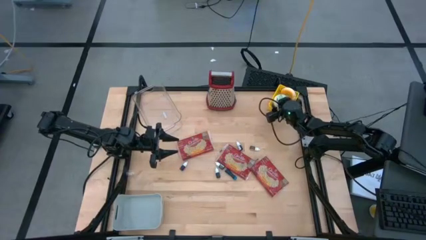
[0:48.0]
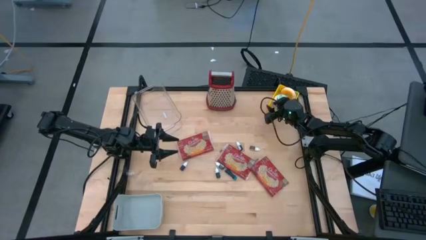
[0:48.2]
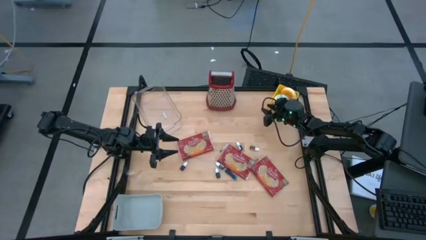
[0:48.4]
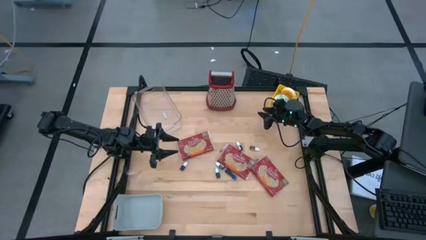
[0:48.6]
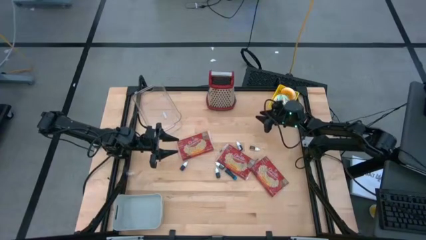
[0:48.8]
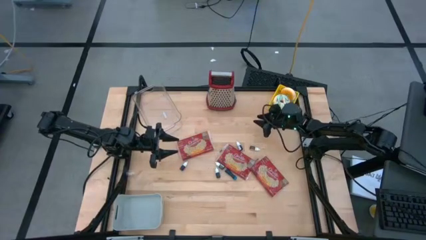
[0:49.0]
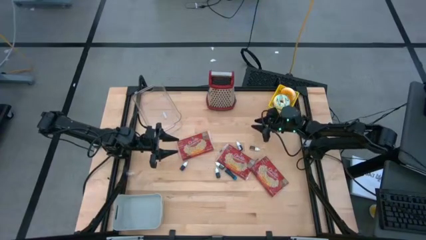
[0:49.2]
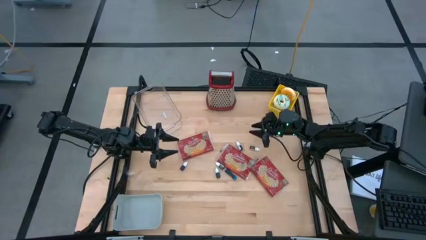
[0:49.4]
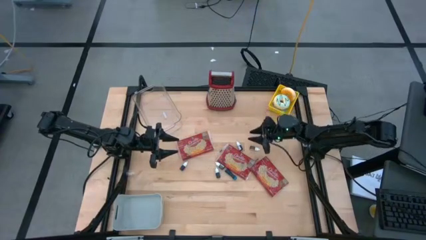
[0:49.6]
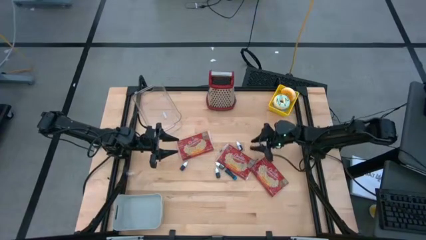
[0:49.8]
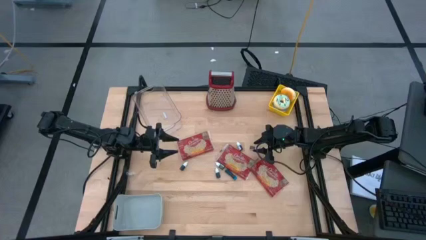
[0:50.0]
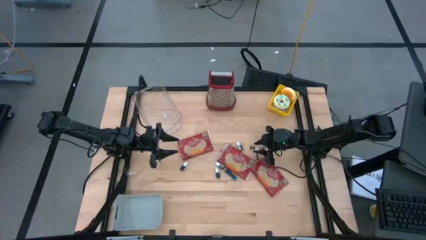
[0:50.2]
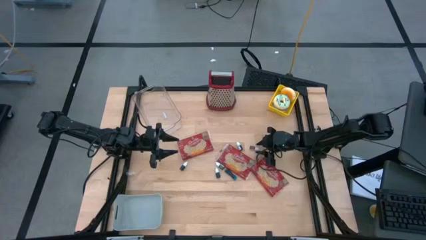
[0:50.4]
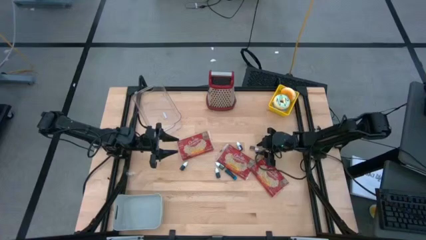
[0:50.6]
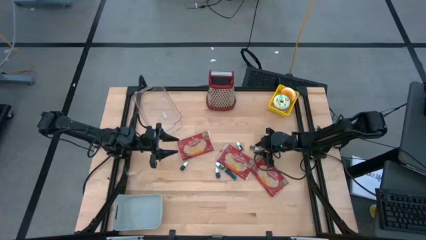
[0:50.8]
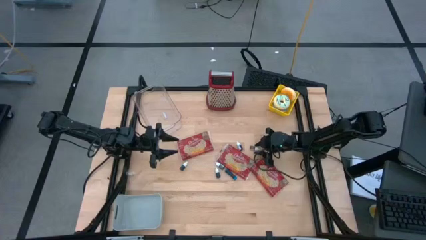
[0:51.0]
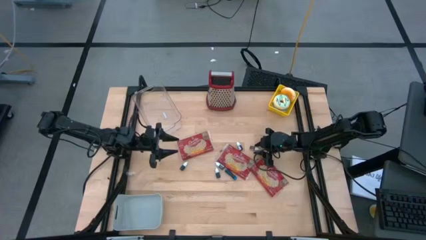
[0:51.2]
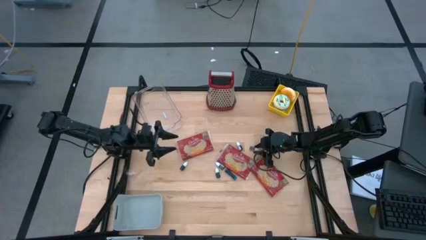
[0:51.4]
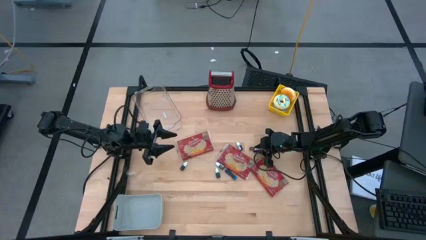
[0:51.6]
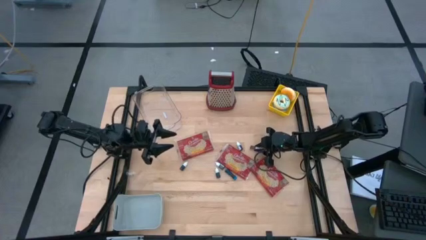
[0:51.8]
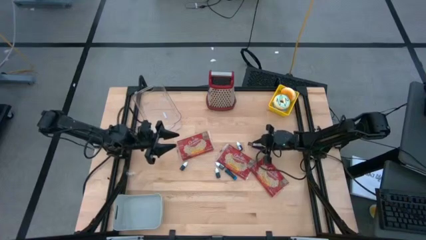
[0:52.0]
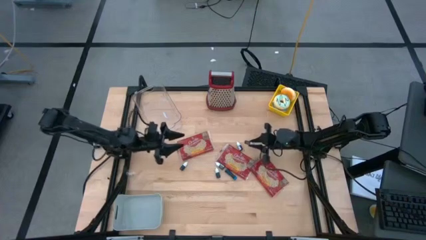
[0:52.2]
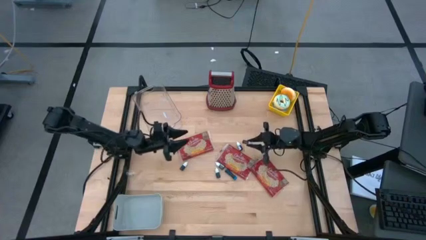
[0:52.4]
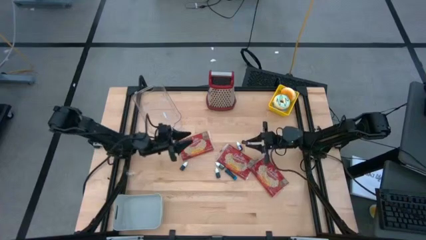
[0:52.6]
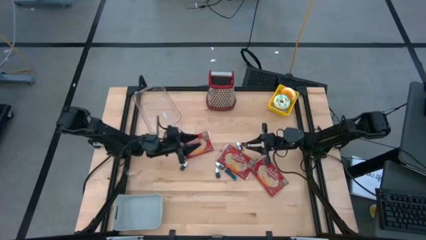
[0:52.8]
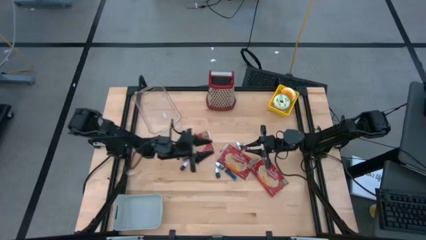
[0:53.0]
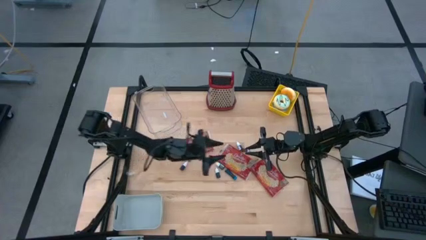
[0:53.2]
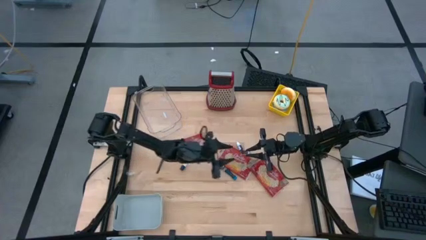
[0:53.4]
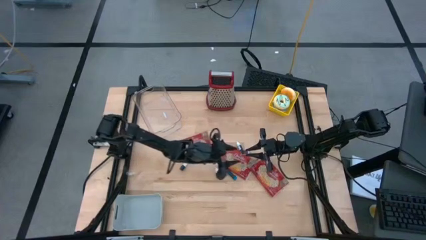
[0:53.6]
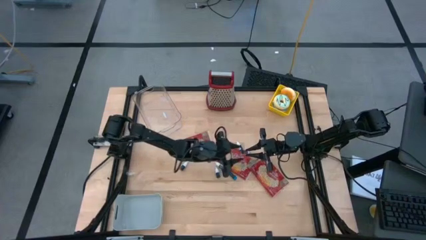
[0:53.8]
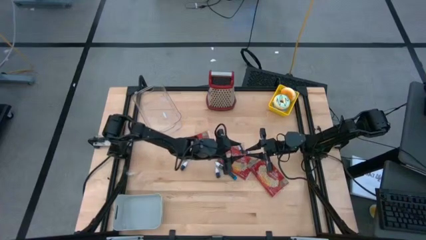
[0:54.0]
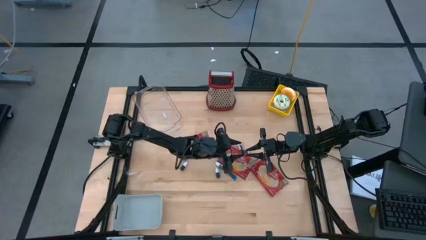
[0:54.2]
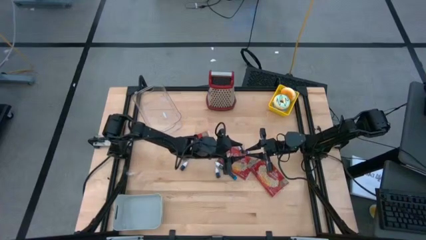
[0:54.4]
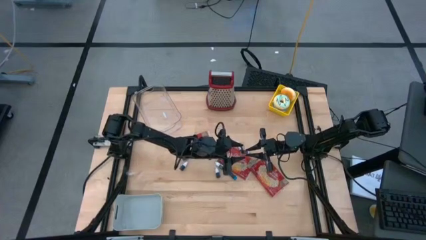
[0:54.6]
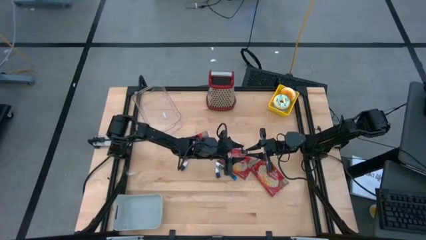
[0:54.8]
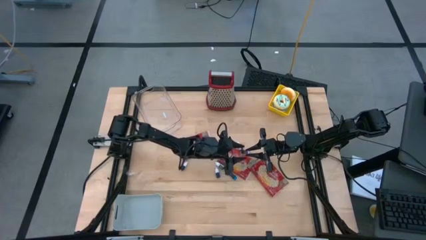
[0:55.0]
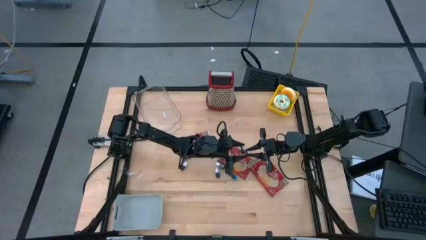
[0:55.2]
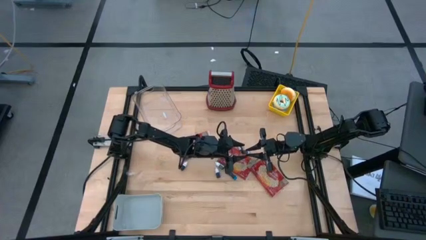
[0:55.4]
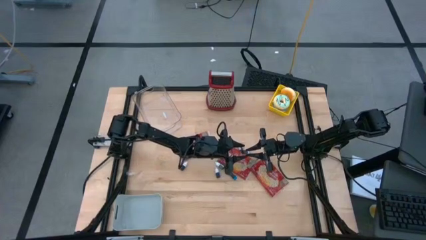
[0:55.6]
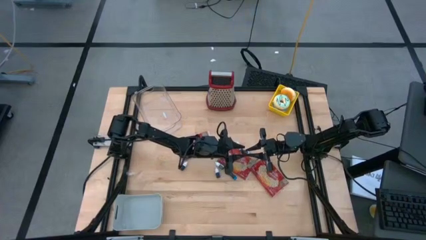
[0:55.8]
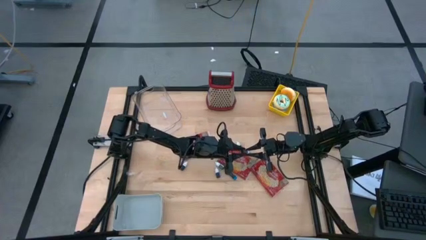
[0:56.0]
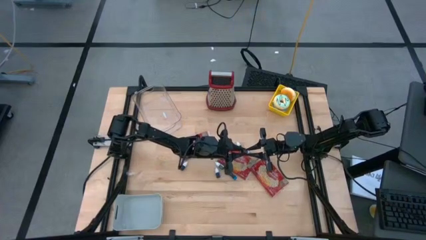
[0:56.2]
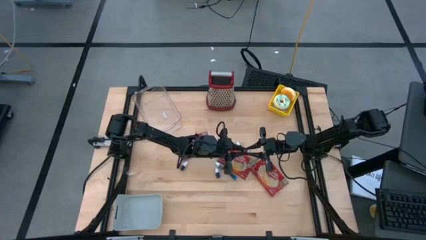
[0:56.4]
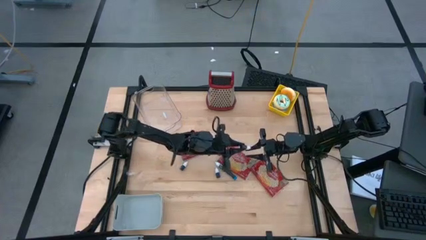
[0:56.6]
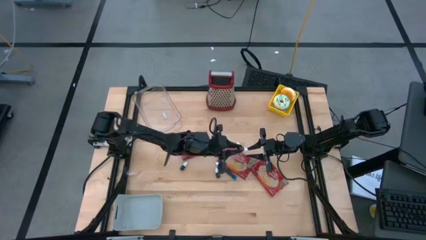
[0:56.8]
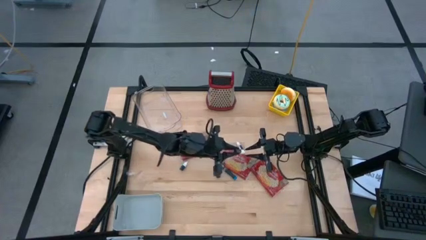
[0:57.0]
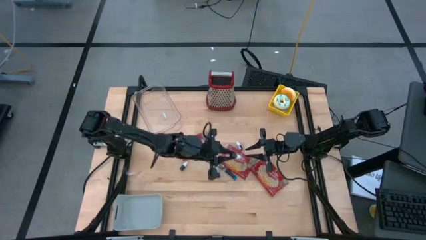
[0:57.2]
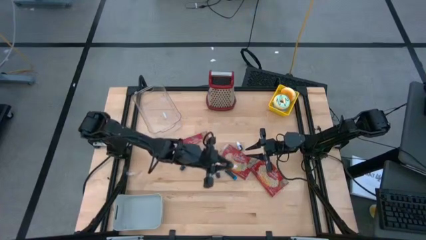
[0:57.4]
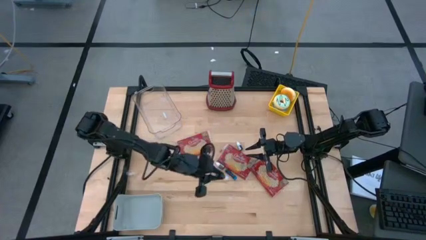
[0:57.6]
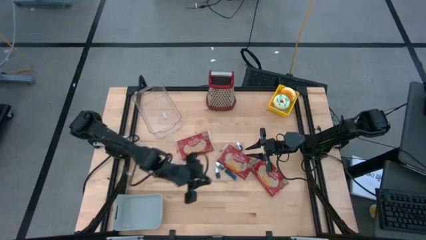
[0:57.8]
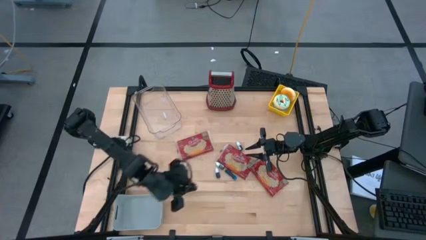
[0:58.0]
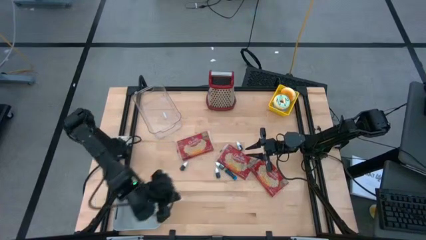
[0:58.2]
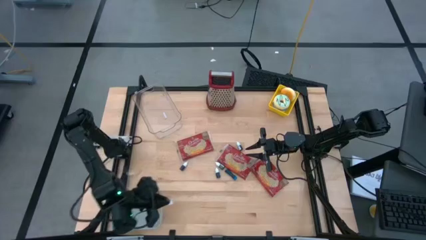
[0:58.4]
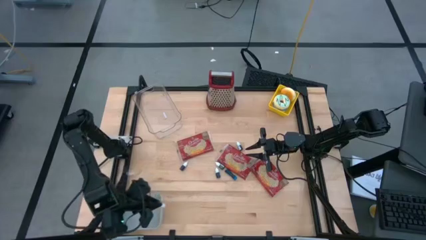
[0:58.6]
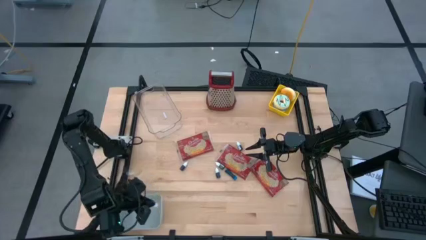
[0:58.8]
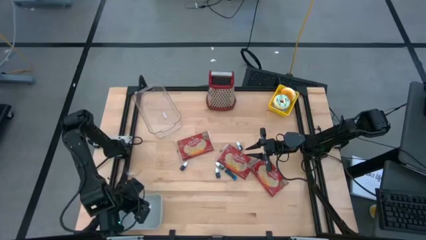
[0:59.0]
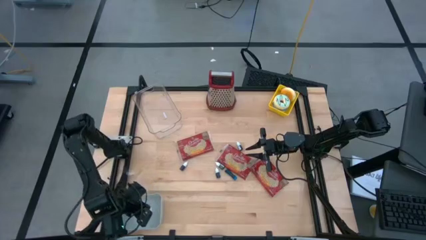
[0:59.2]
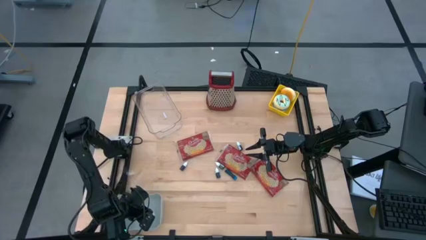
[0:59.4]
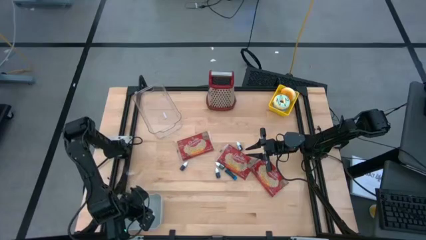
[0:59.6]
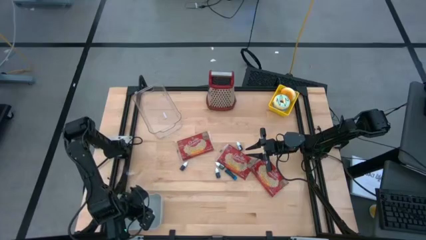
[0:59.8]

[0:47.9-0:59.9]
Put the brown food coloring bottle into the gray bin
